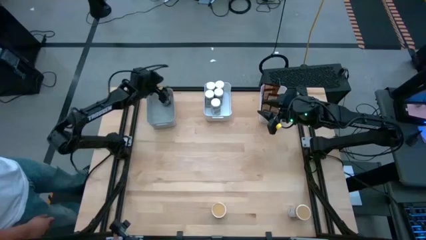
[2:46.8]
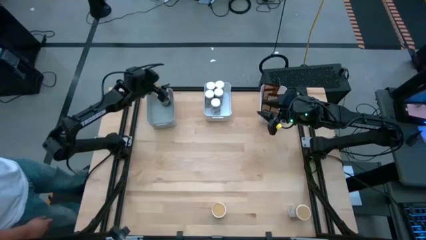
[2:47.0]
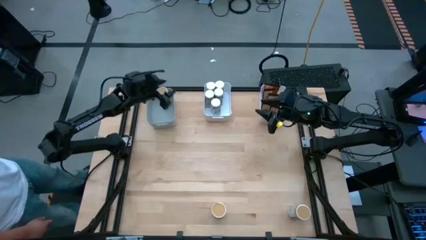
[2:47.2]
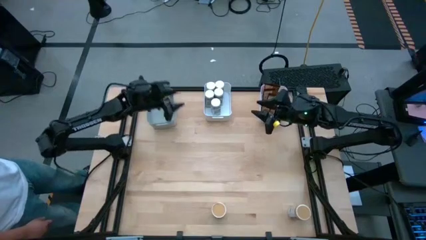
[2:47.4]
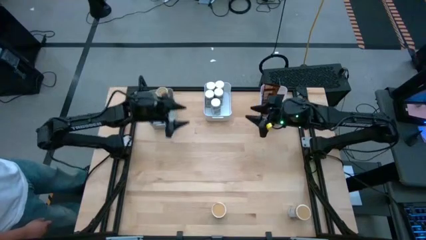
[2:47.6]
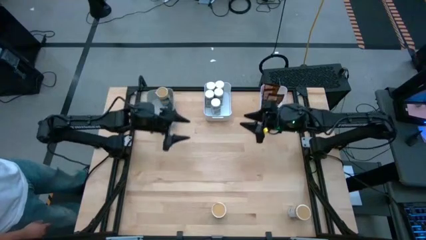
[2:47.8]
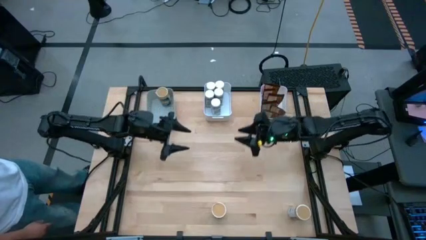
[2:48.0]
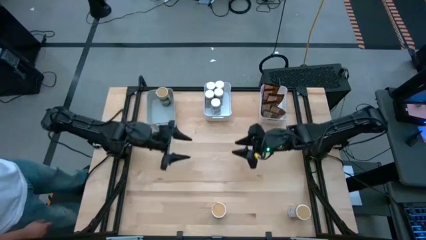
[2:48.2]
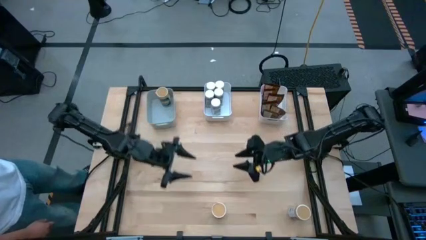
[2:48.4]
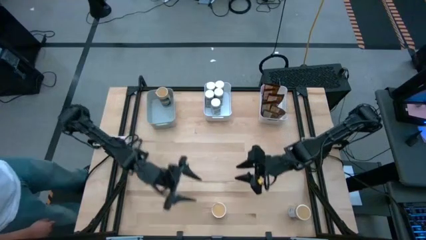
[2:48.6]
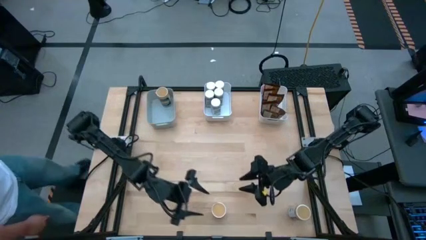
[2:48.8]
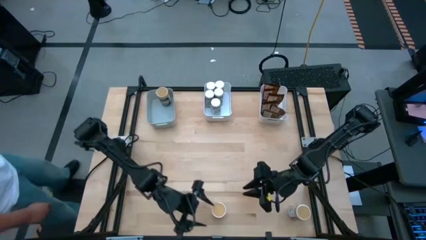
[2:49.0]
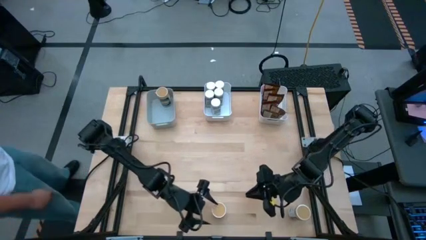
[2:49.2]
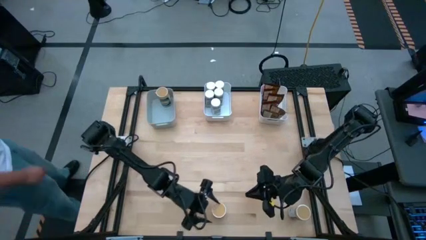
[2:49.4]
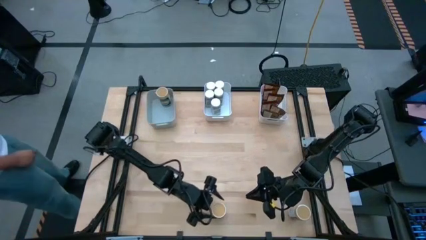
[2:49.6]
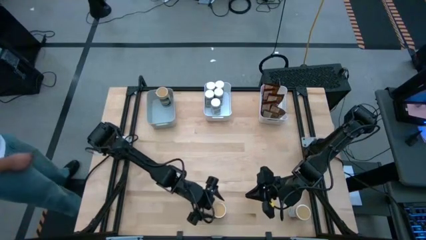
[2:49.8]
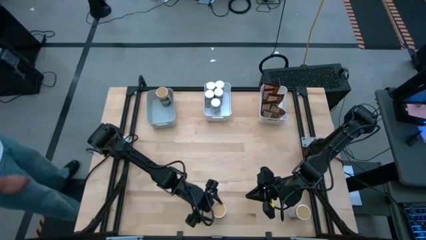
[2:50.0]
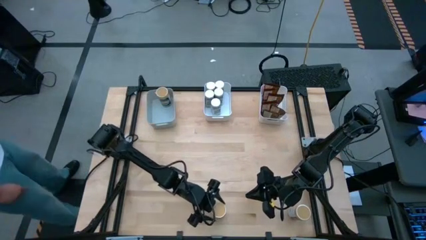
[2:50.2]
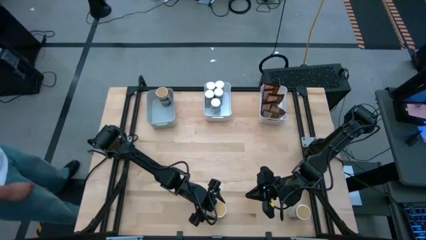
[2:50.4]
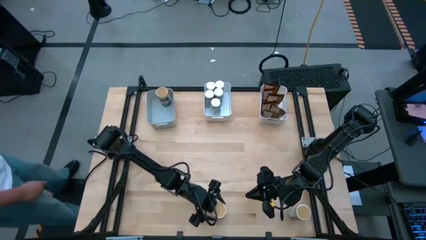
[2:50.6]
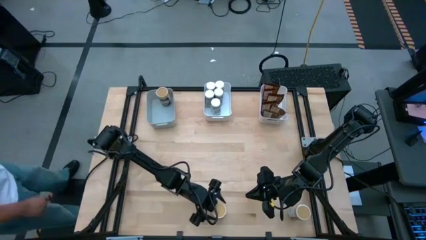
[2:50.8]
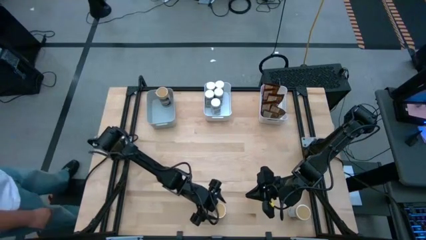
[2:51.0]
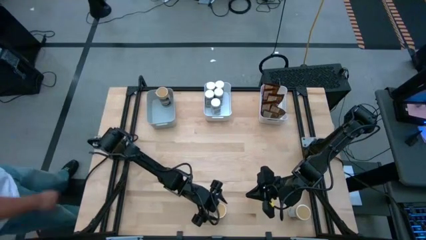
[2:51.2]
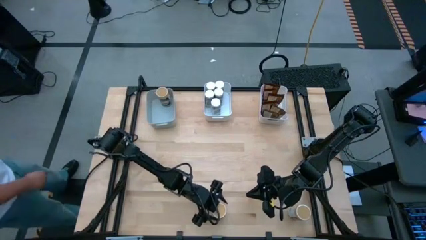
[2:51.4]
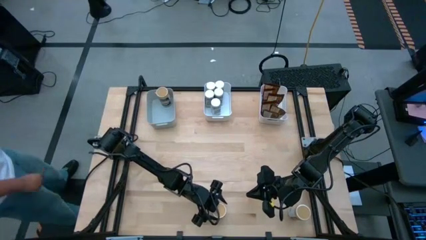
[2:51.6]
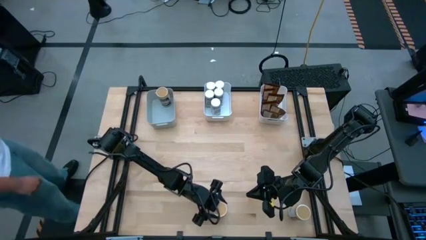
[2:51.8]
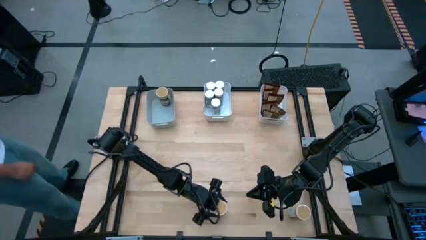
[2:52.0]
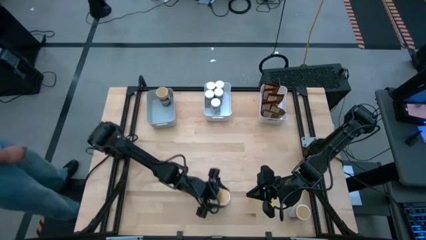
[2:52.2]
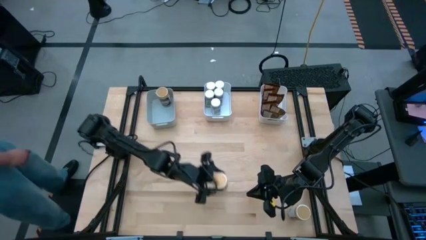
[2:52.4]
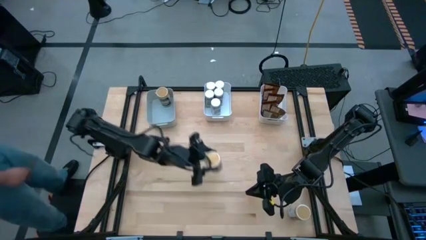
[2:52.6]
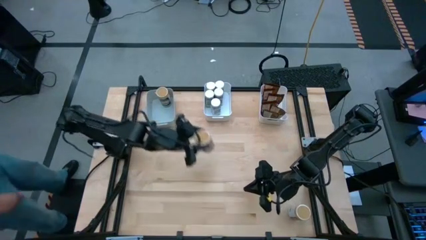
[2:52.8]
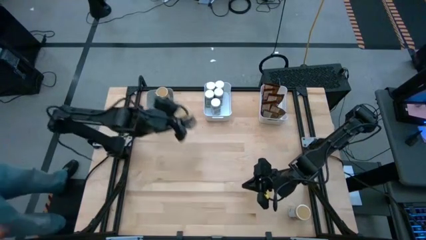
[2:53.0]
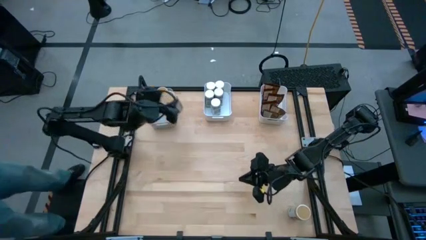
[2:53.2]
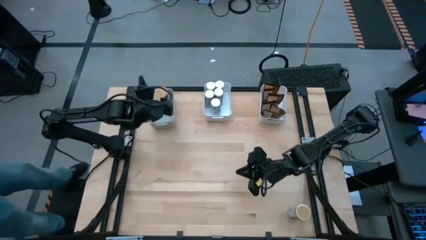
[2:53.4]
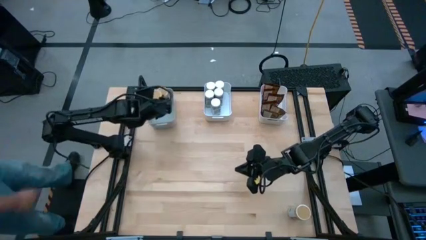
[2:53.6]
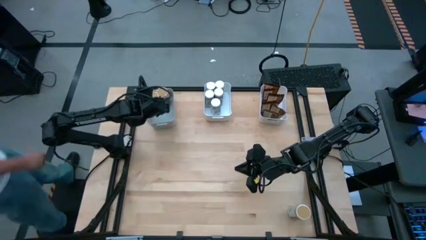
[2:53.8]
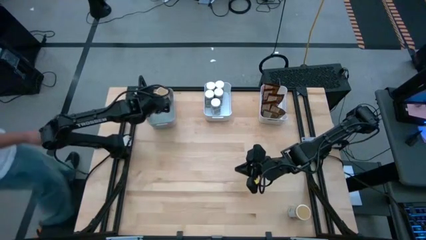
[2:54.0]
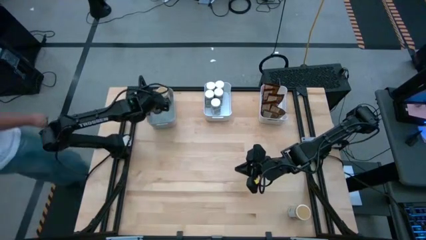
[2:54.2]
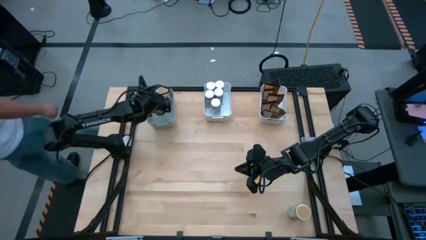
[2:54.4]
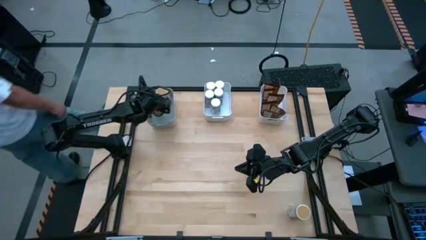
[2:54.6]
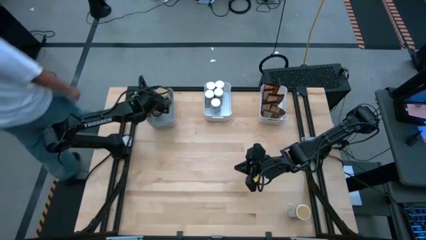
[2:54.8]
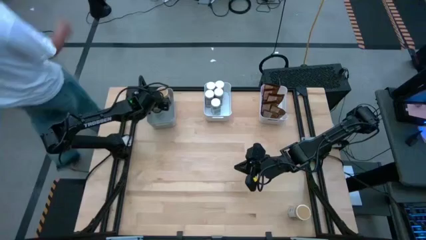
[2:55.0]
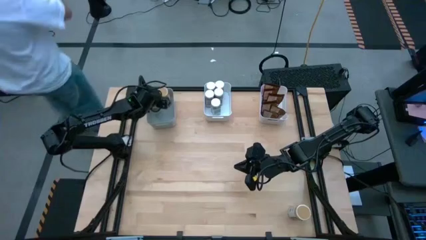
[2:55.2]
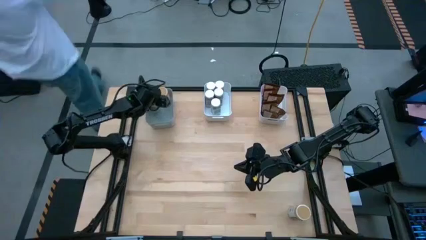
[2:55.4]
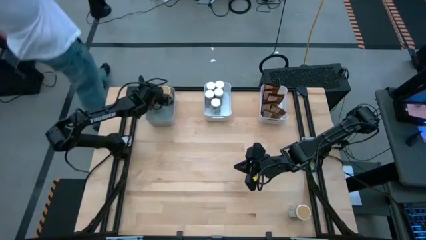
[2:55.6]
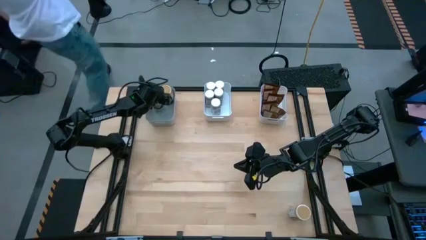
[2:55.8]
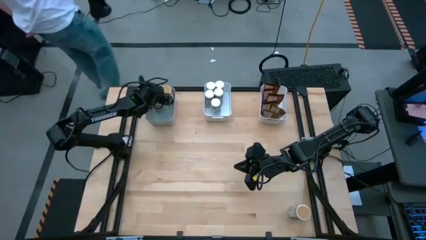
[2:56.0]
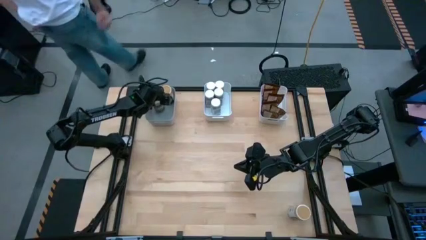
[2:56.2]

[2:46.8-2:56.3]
Task: Sort spices by type
Put the gold seasoning bottle into the gray bin

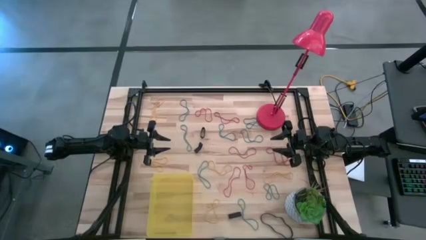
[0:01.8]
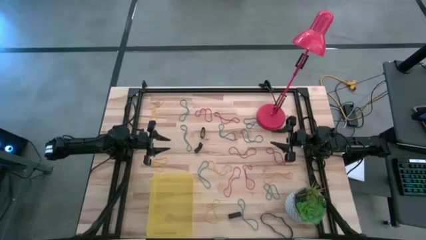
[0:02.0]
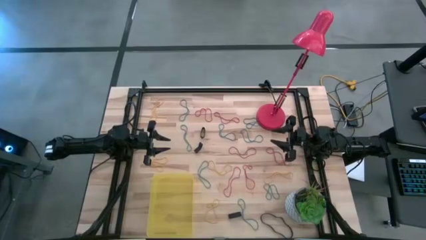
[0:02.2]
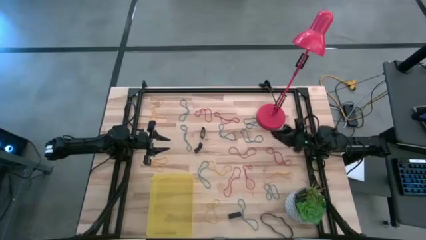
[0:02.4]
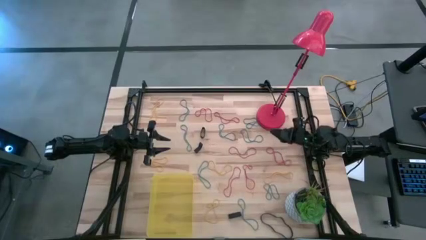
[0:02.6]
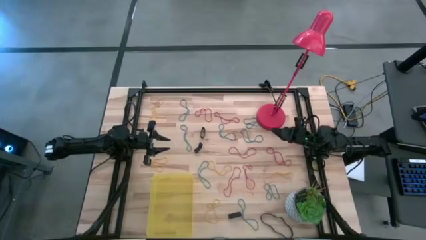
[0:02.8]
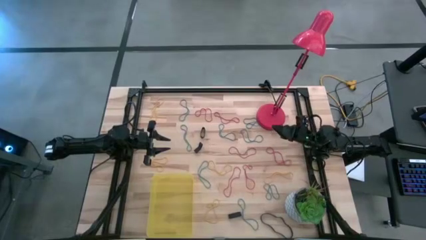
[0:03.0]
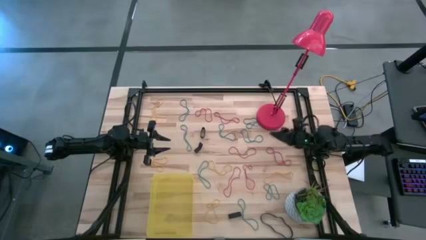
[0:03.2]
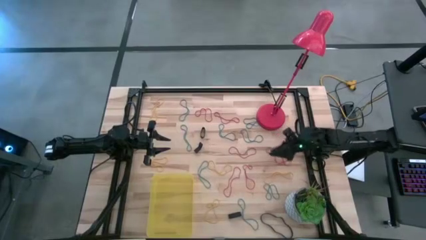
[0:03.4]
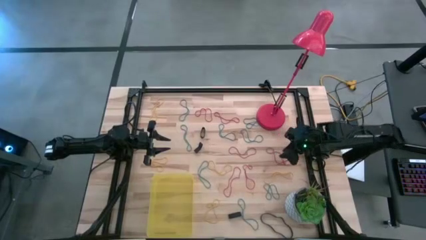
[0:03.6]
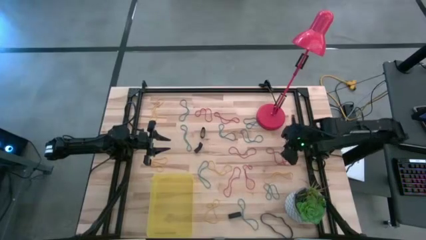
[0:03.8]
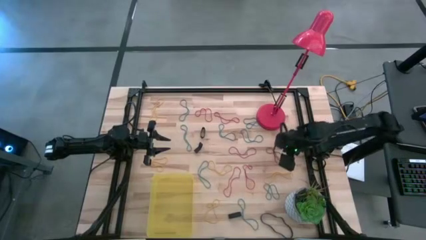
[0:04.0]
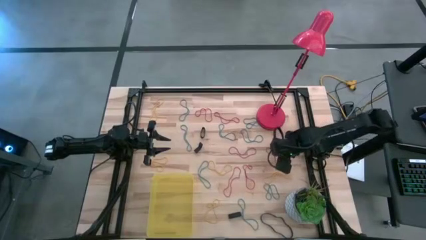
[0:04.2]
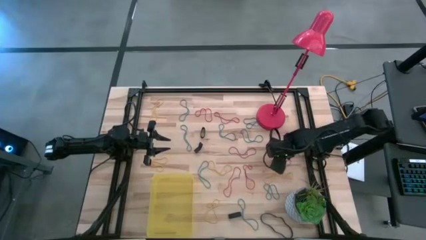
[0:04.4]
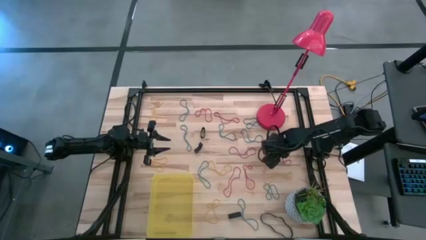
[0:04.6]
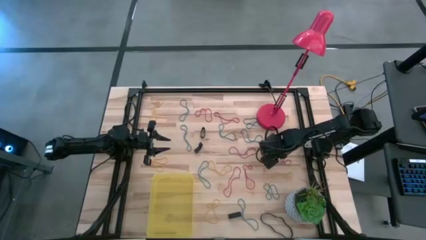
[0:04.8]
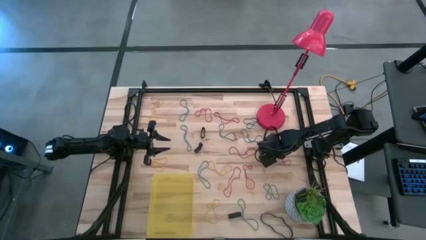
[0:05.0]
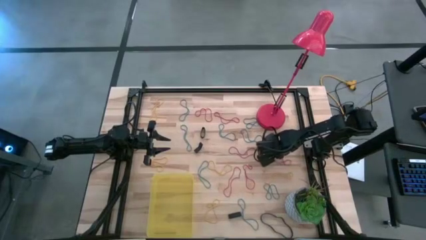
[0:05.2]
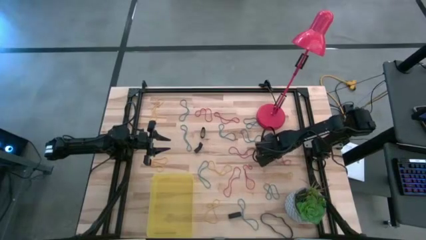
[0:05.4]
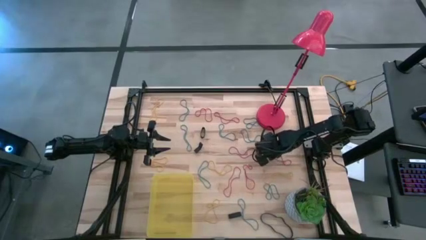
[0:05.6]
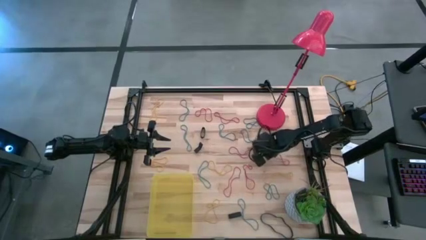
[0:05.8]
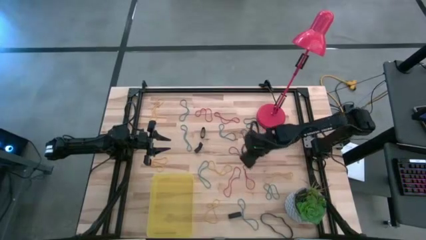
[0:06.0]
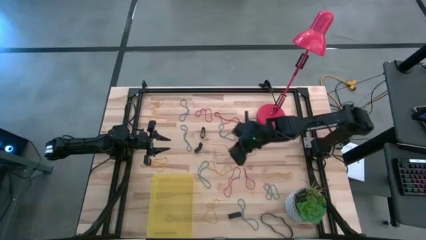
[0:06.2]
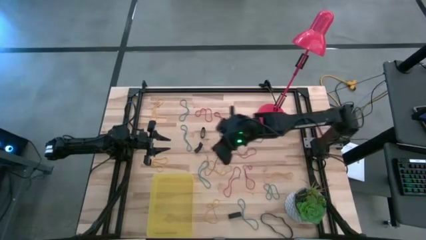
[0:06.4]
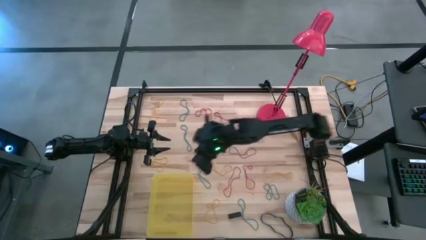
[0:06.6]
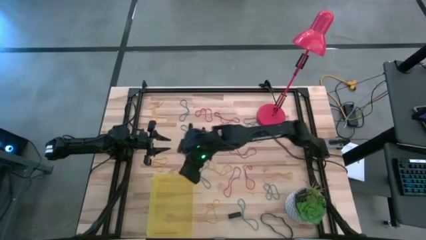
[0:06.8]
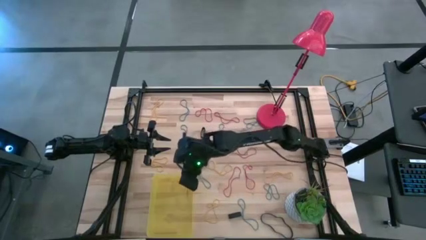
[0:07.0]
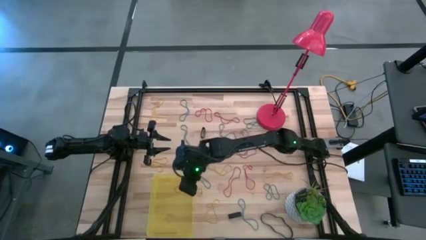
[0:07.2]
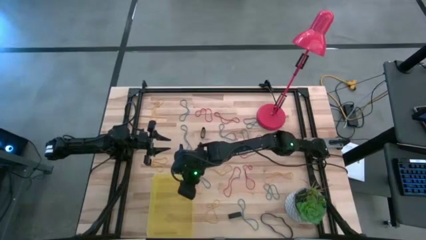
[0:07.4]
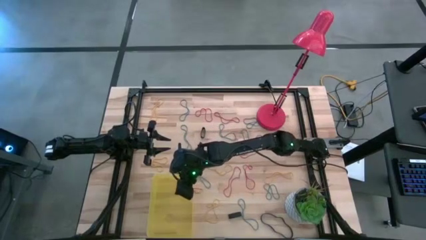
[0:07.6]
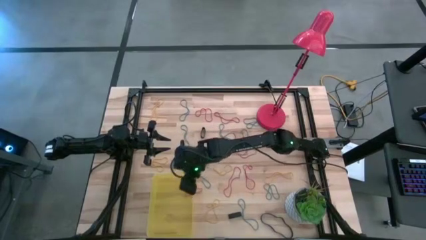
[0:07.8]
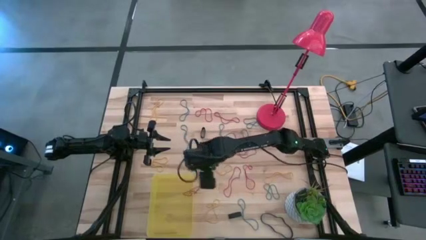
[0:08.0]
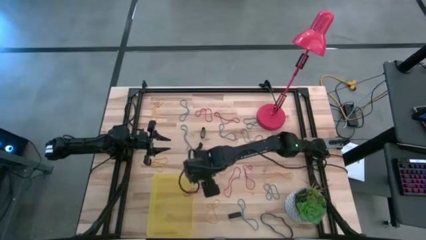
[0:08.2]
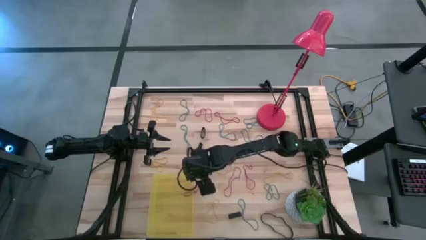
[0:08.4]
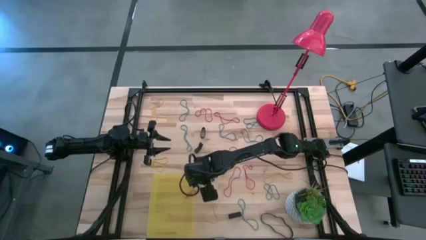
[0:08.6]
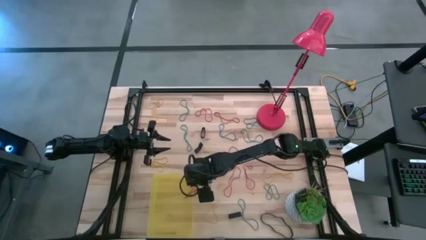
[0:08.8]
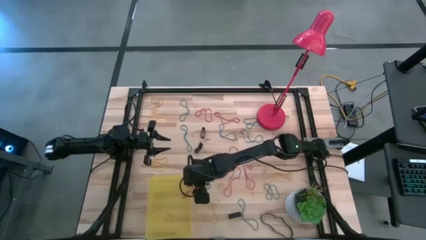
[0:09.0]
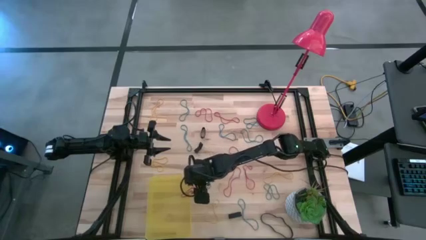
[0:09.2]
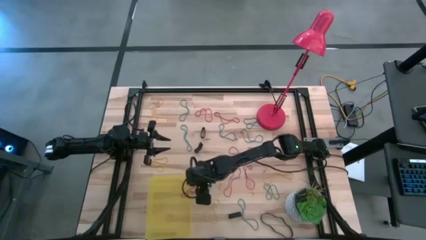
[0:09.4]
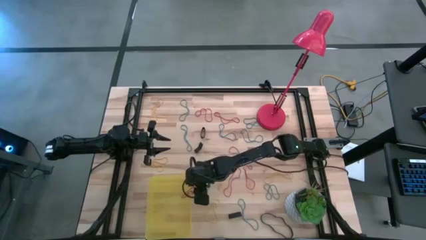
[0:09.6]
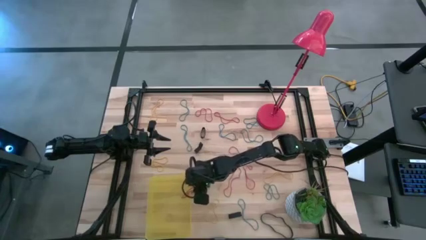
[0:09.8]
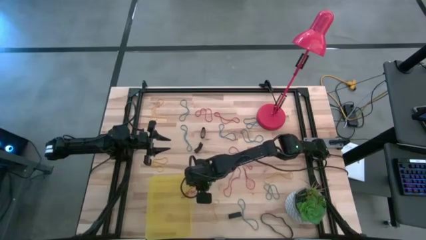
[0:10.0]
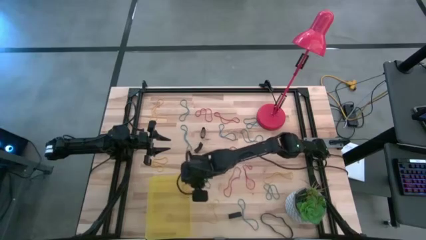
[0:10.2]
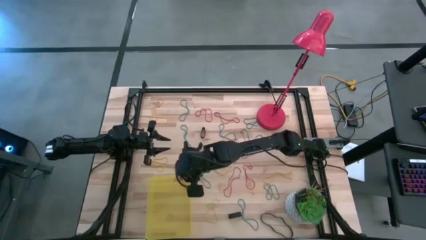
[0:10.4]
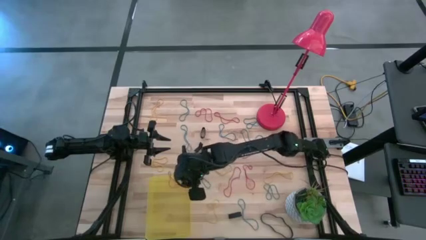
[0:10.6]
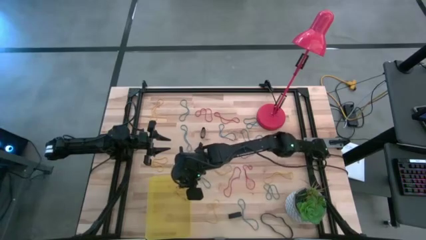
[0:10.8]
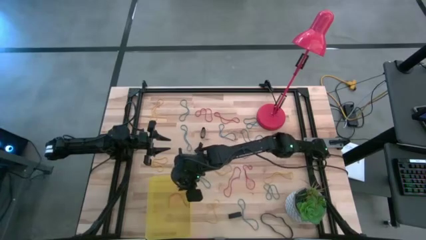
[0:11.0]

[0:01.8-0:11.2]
Task: Pick and place rubber bands into bin
Put the red rubber band into the bin
